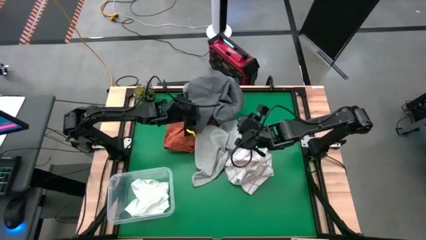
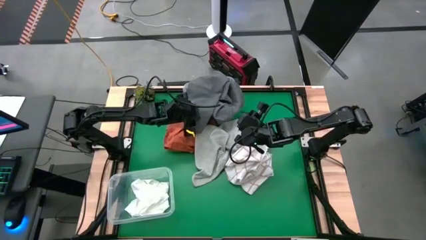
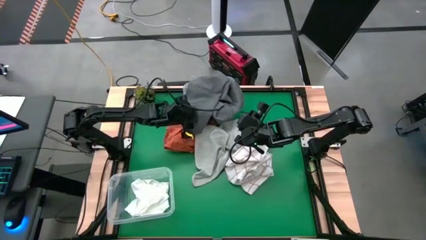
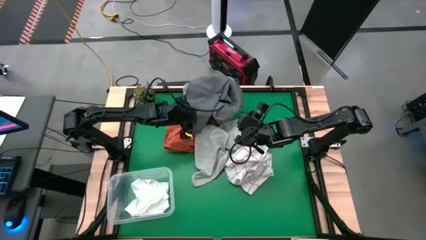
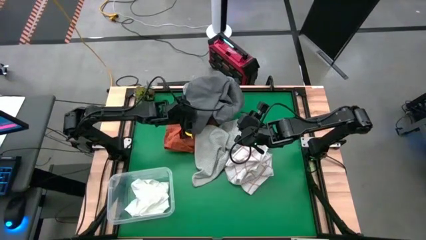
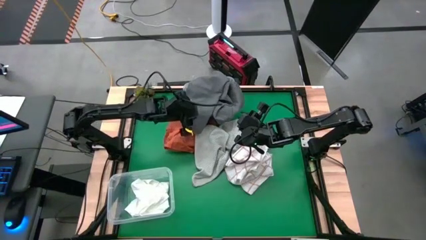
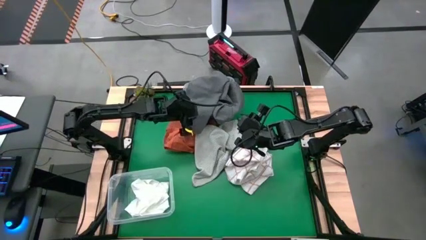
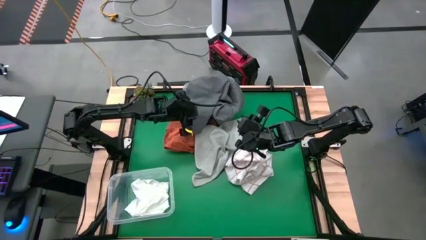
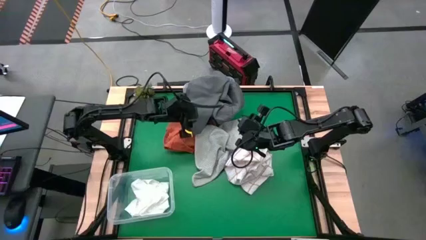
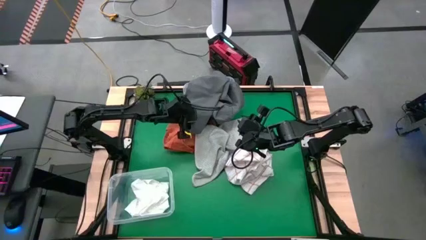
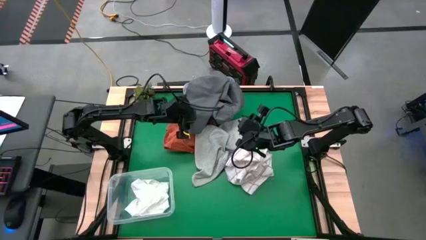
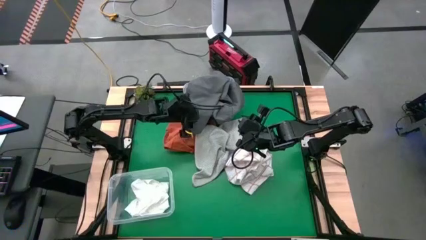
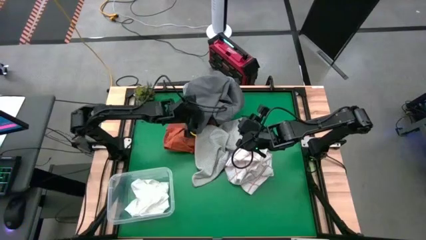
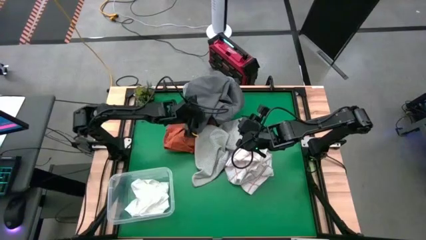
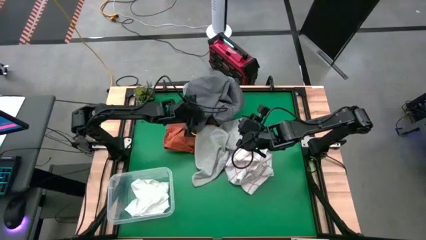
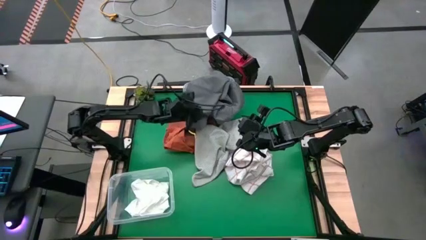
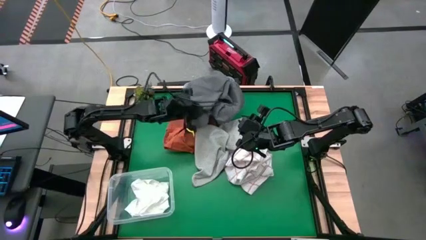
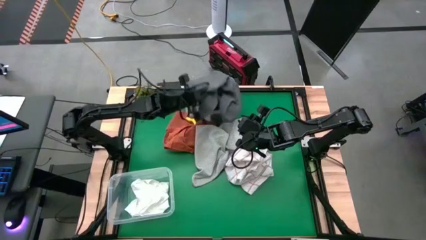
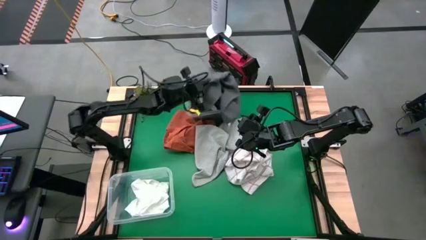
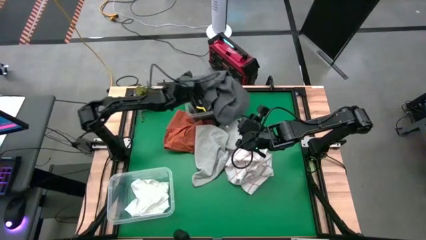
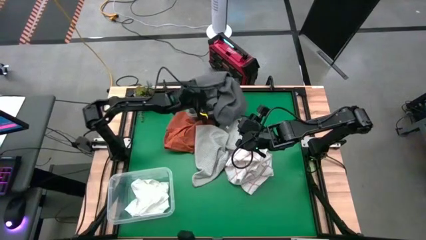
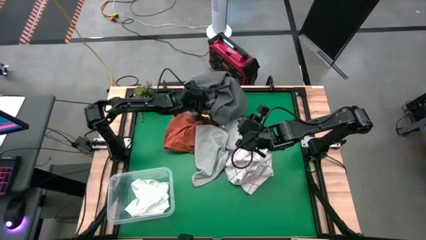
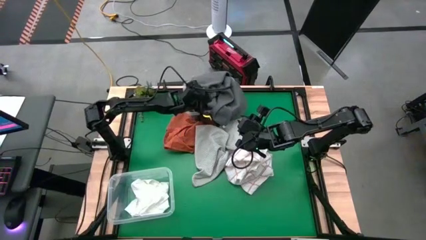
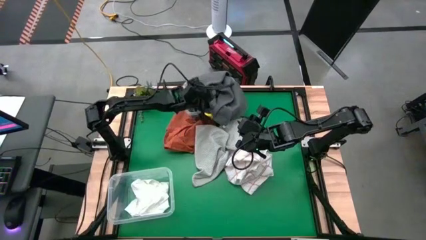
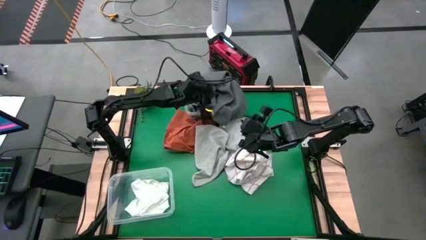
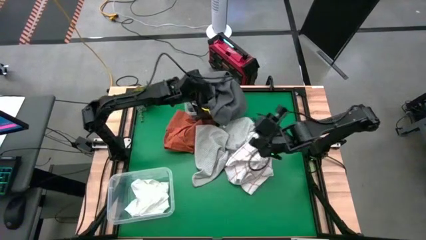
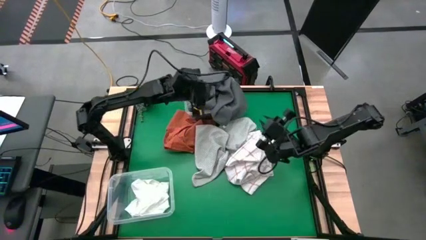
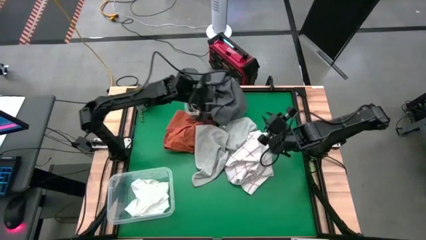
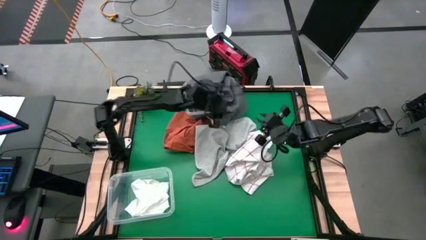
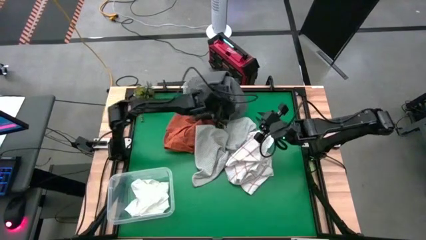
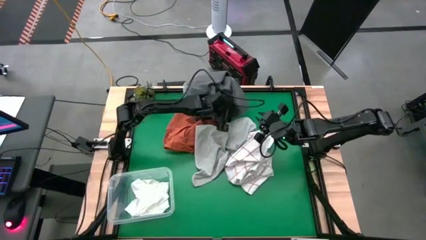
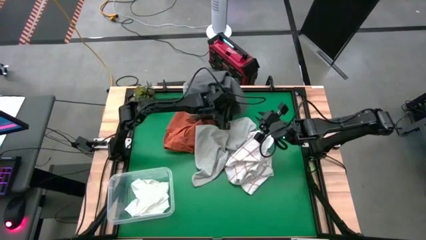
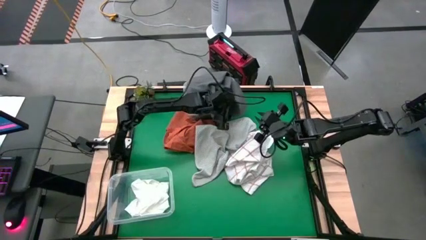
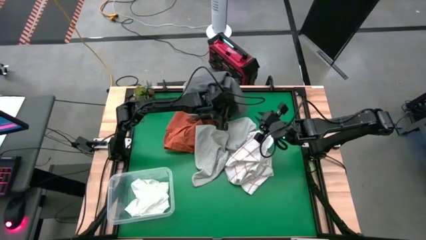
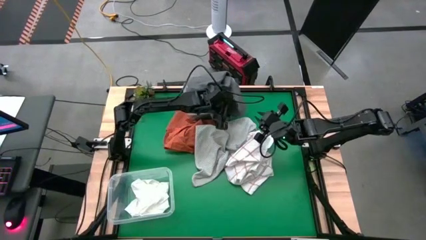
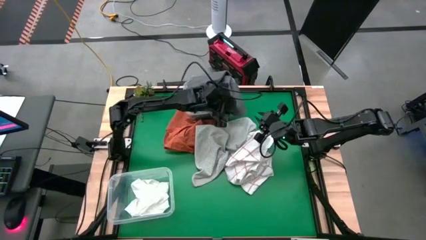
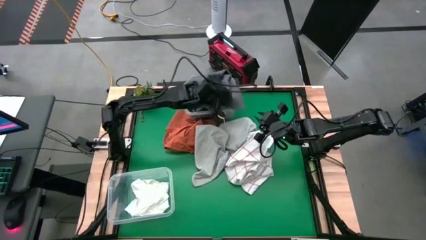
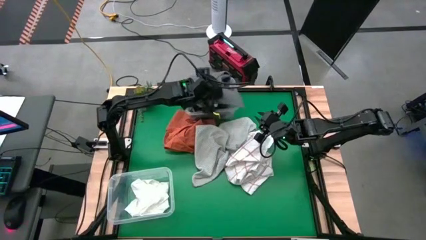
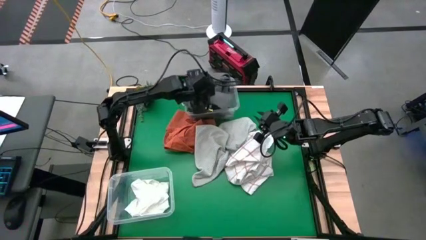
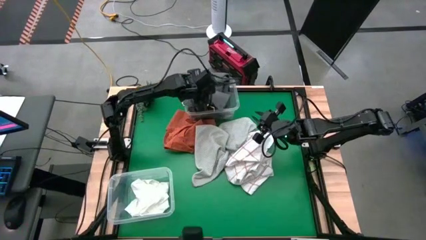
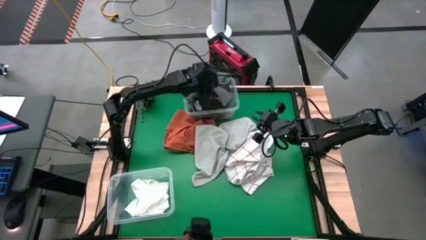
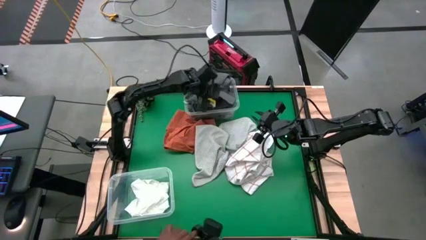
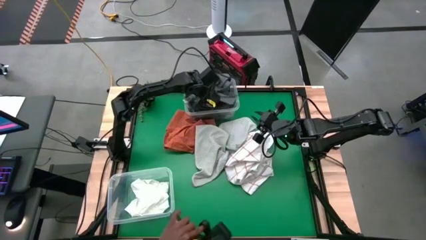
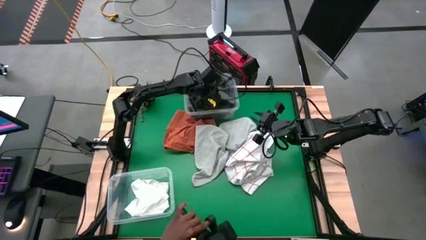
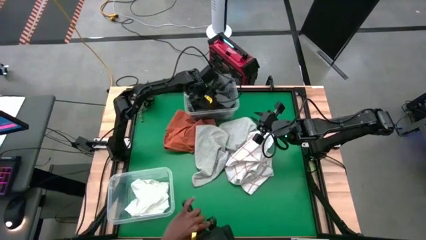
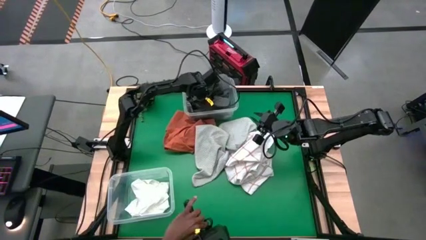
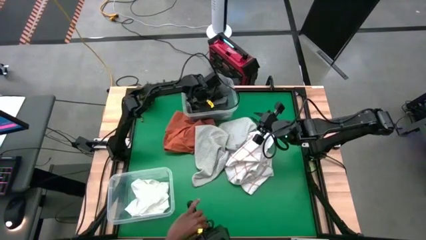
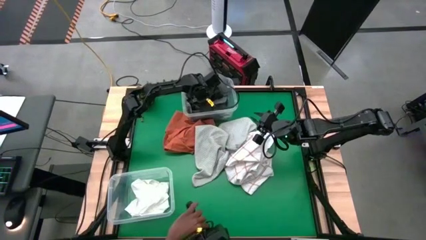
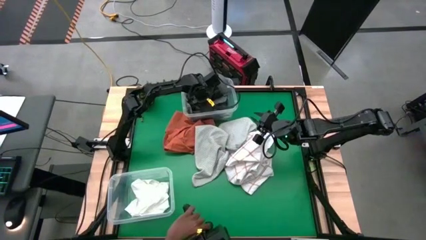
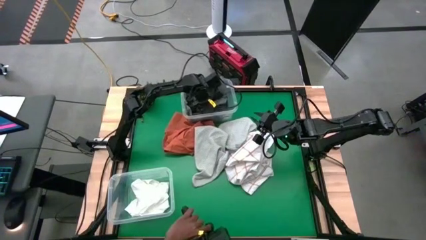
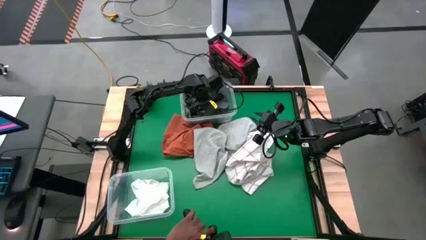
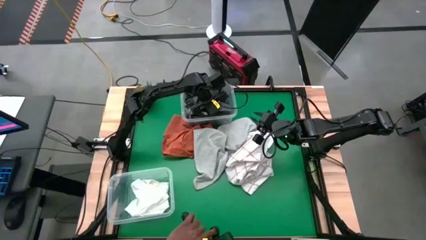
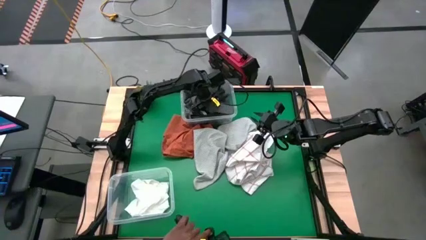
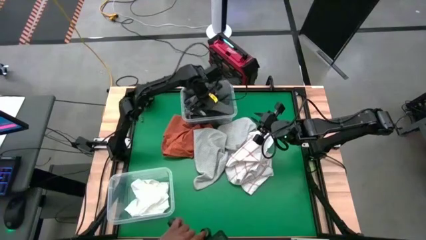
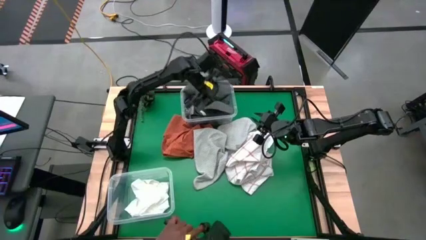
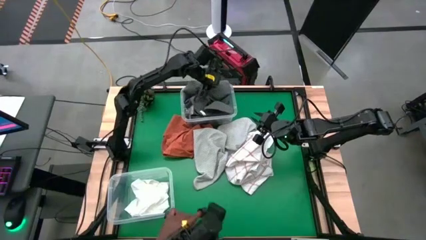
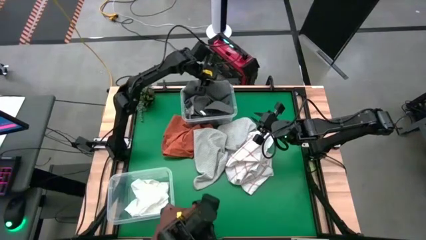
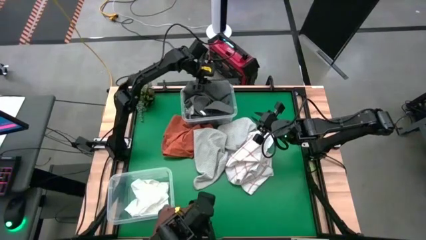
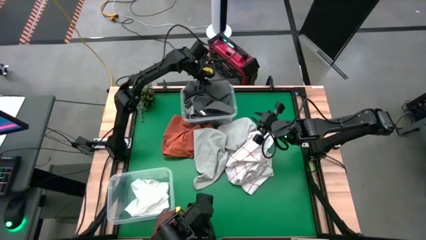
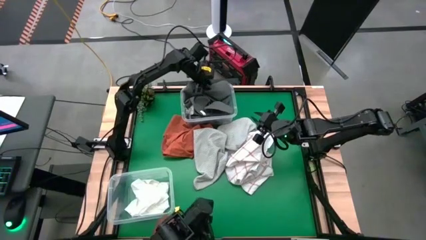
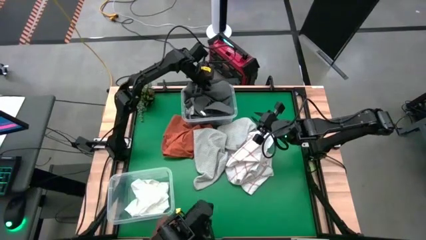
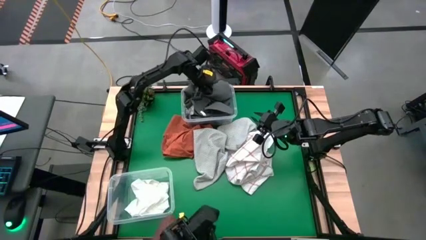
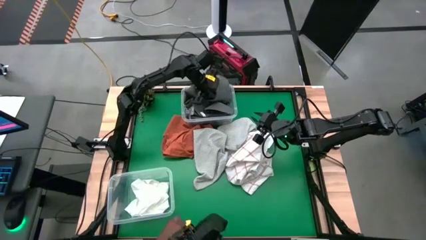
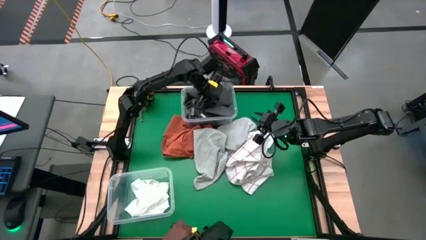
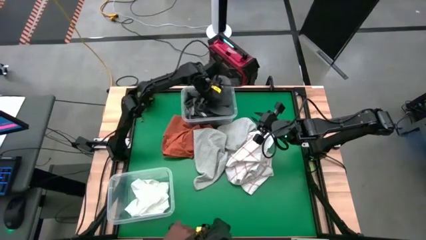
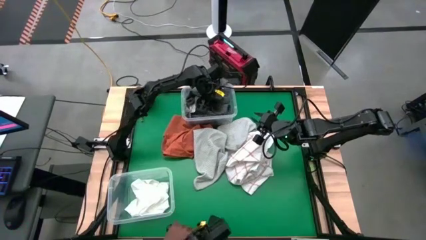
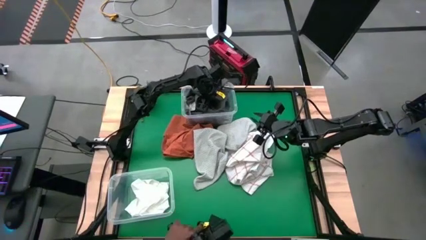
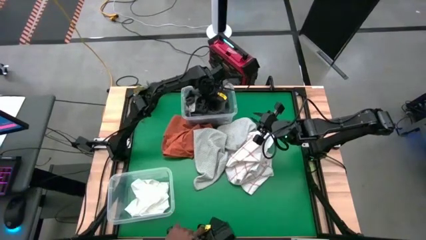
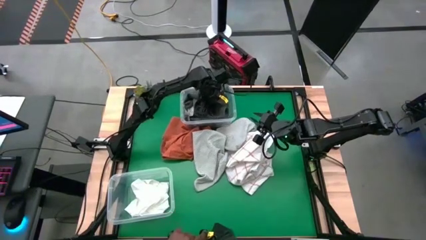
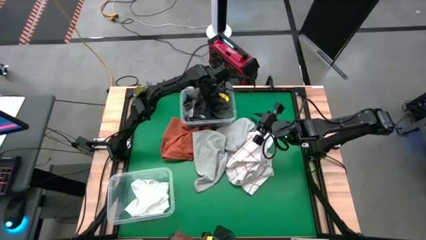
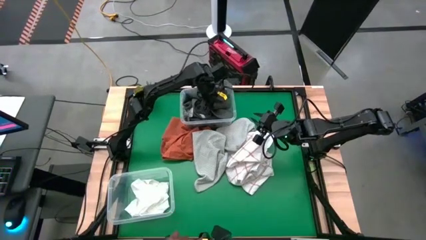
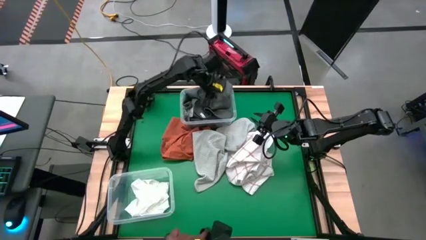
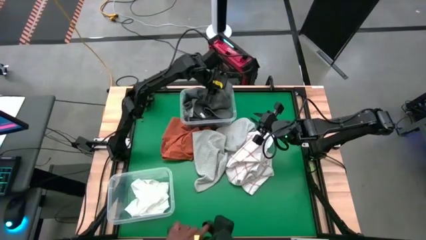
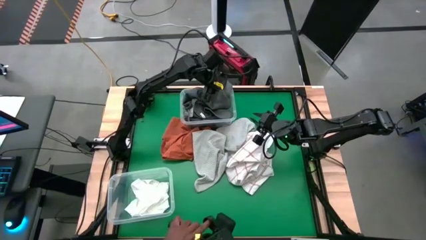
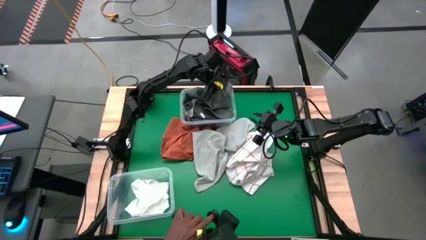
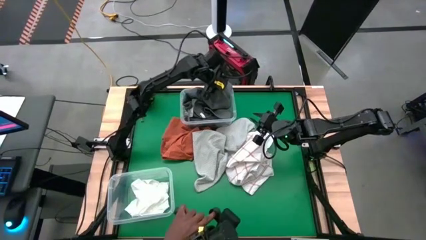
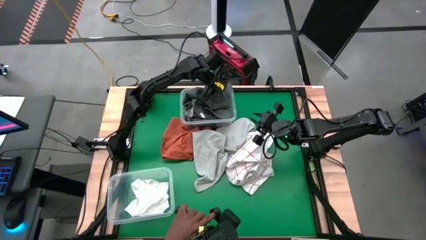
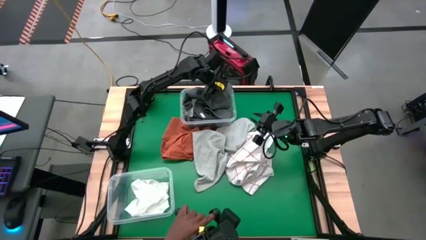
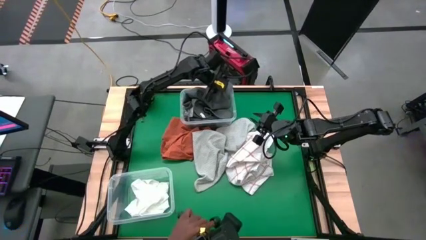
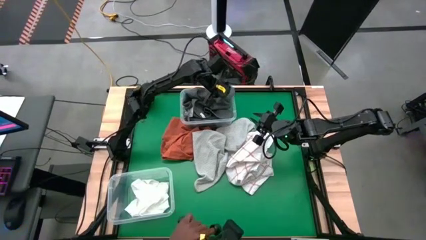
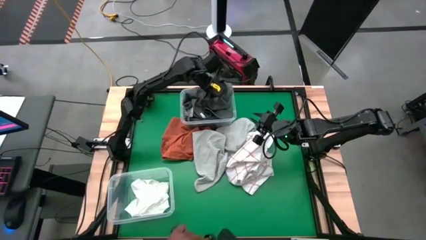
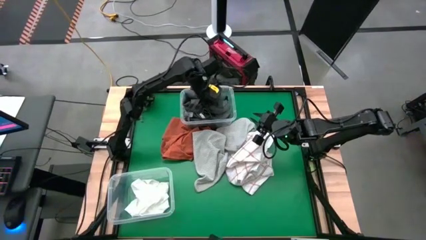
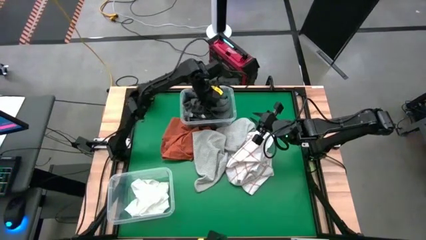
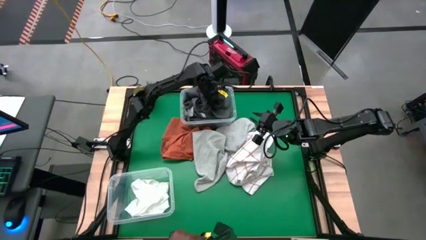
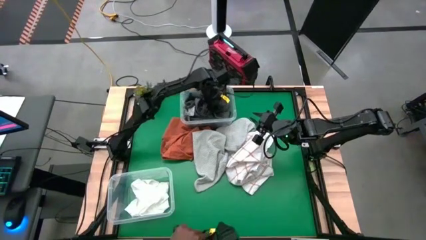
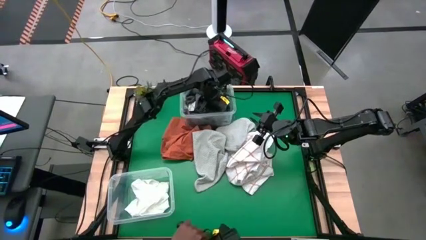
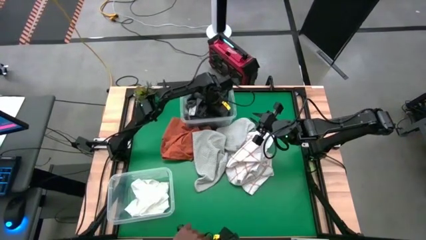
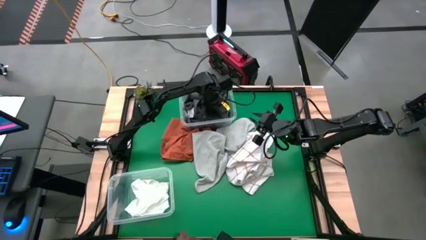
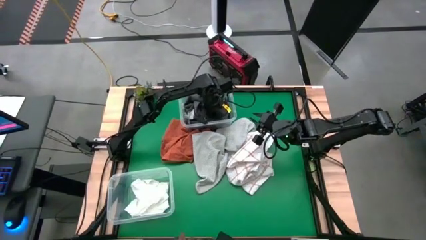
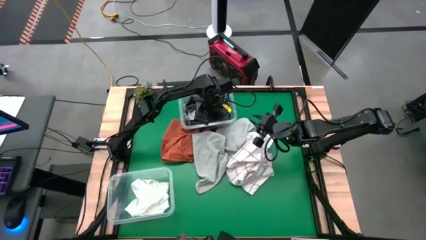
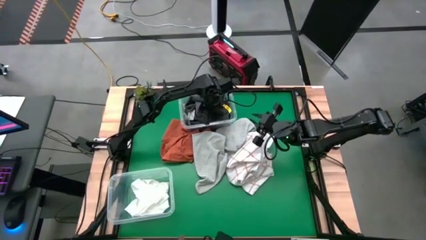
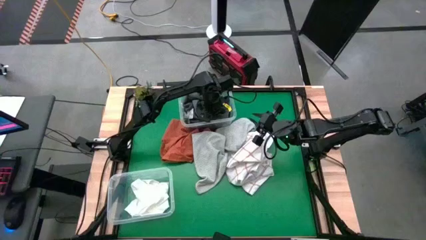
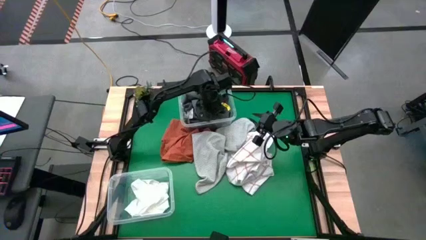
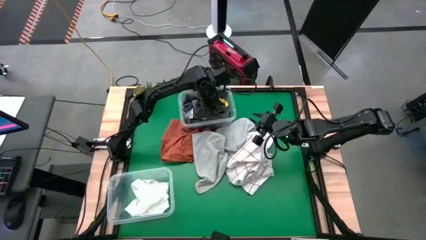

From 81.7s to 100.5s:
Task: Sort towels by color in basket
Put the gray towel into the top transparent bin
